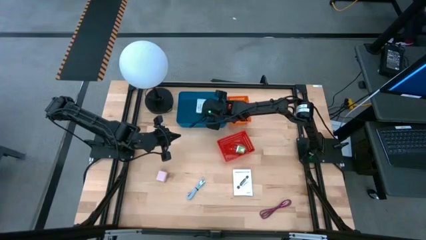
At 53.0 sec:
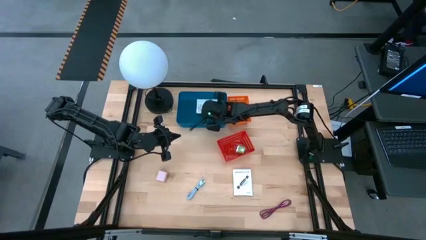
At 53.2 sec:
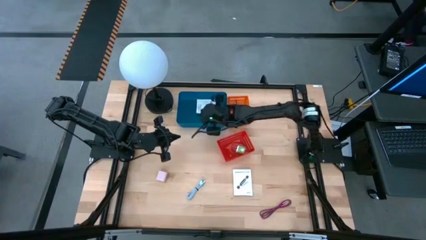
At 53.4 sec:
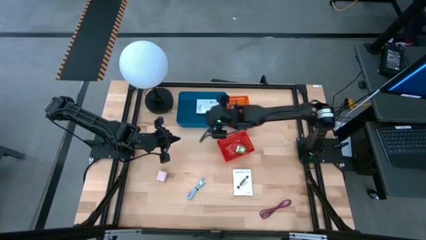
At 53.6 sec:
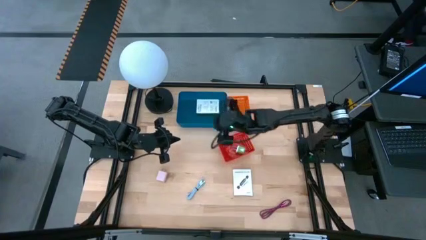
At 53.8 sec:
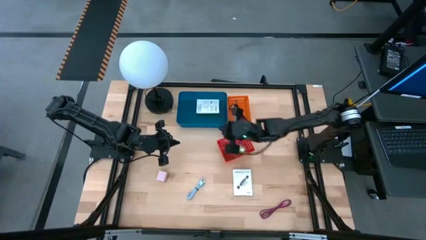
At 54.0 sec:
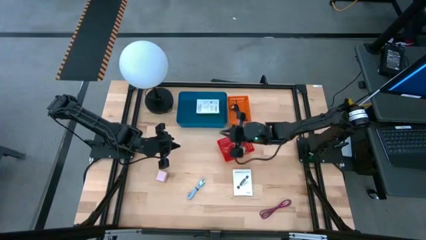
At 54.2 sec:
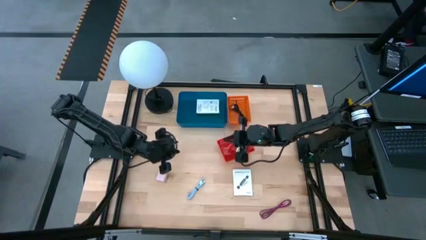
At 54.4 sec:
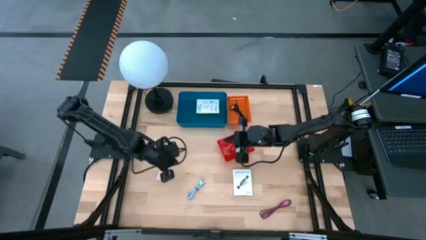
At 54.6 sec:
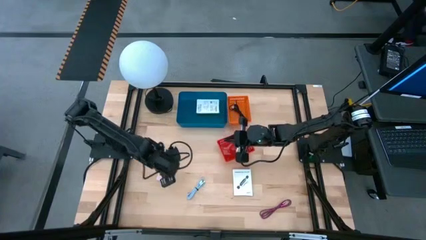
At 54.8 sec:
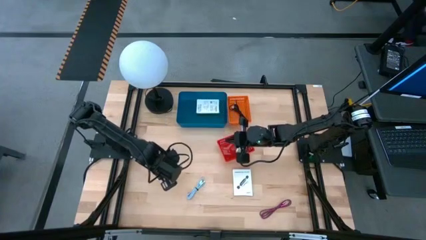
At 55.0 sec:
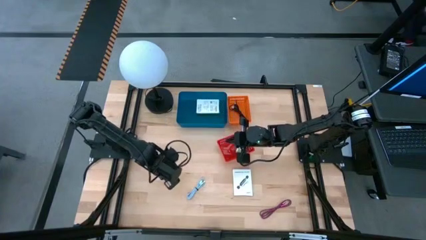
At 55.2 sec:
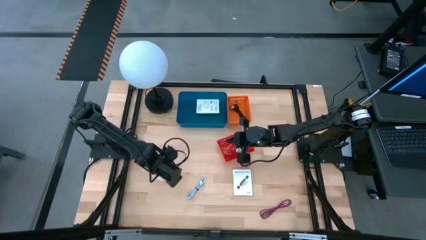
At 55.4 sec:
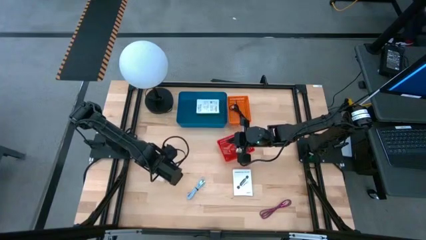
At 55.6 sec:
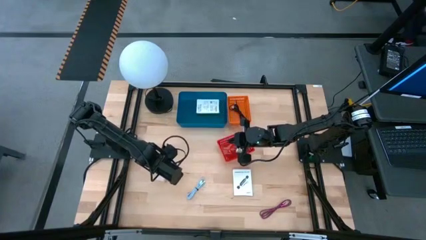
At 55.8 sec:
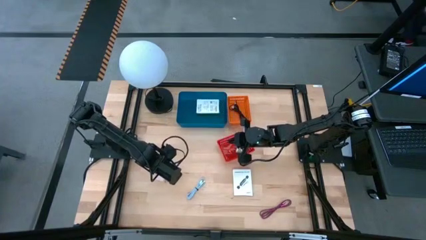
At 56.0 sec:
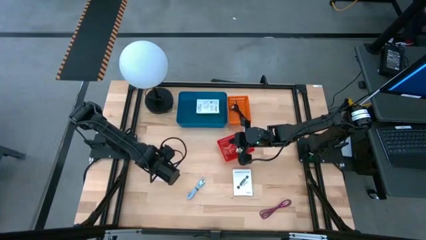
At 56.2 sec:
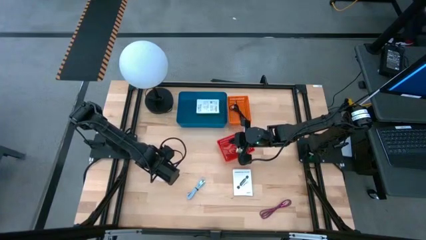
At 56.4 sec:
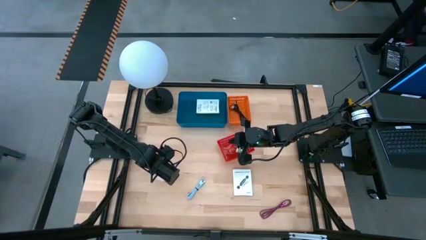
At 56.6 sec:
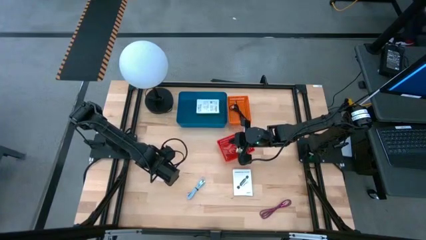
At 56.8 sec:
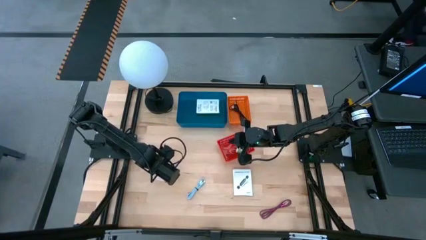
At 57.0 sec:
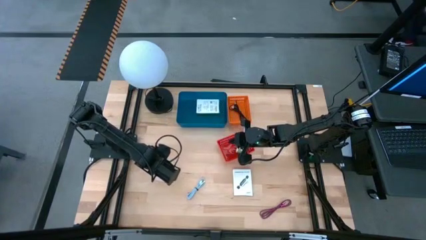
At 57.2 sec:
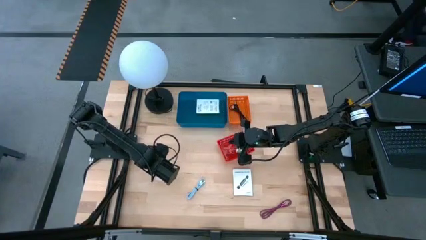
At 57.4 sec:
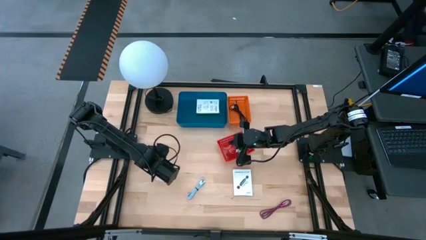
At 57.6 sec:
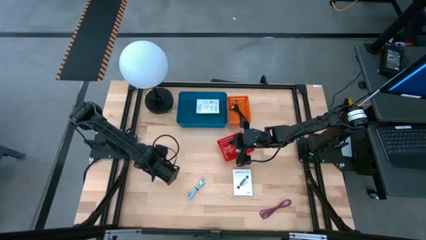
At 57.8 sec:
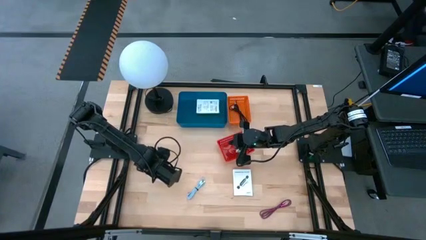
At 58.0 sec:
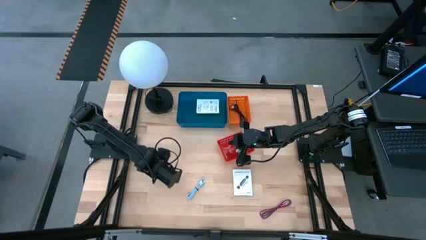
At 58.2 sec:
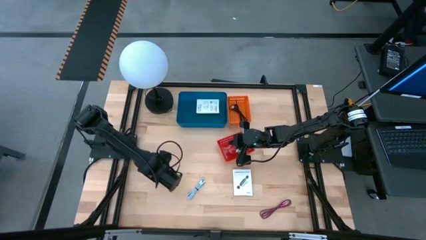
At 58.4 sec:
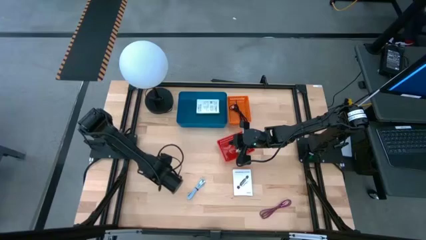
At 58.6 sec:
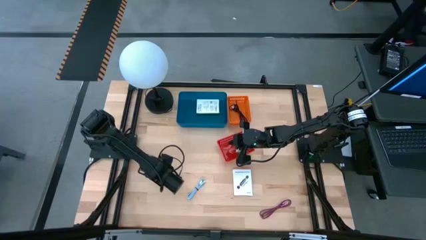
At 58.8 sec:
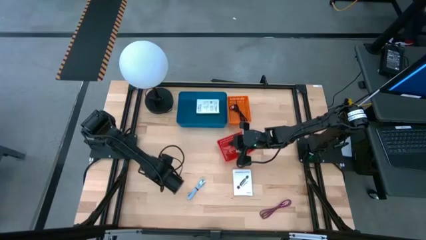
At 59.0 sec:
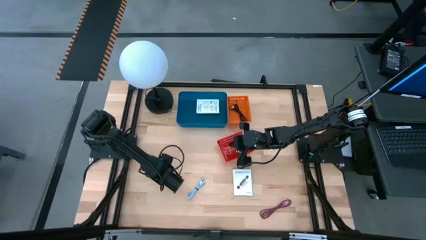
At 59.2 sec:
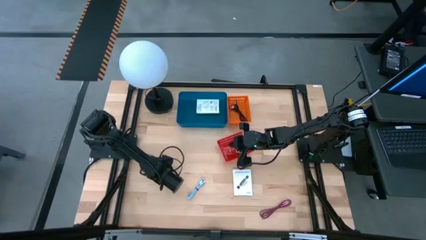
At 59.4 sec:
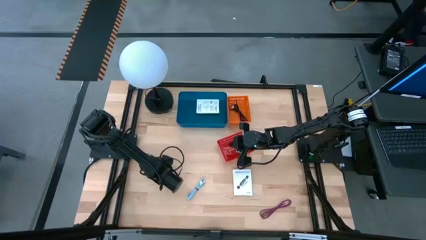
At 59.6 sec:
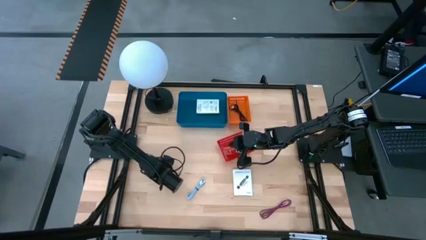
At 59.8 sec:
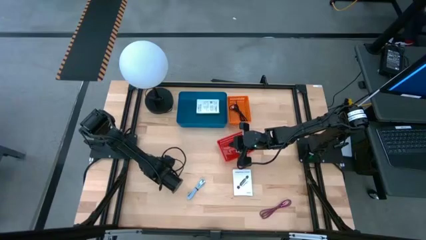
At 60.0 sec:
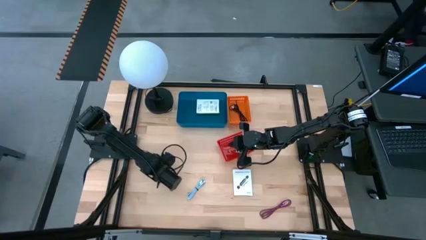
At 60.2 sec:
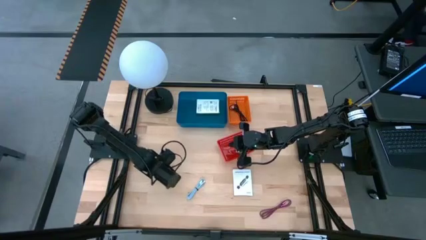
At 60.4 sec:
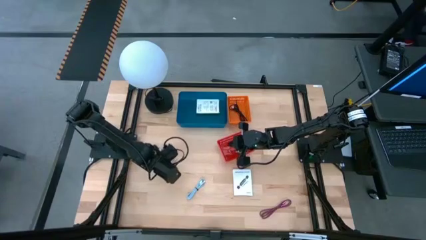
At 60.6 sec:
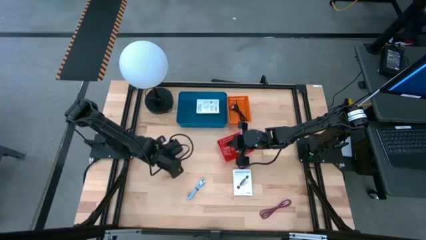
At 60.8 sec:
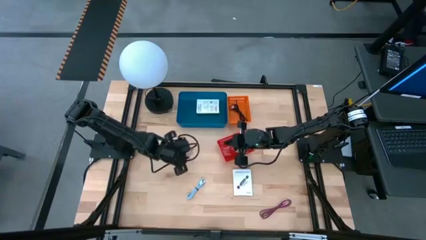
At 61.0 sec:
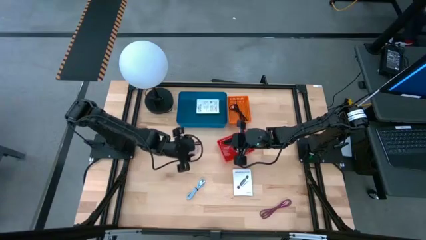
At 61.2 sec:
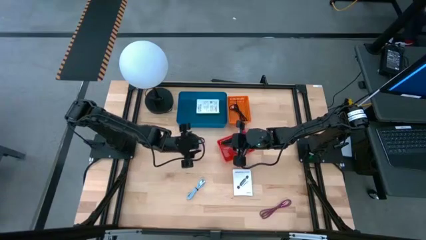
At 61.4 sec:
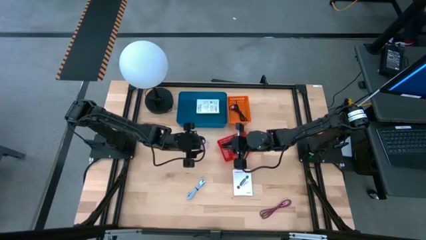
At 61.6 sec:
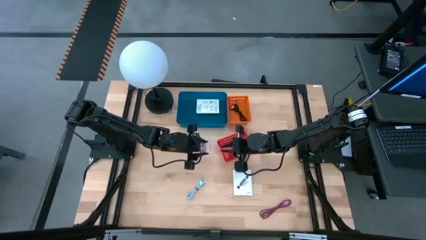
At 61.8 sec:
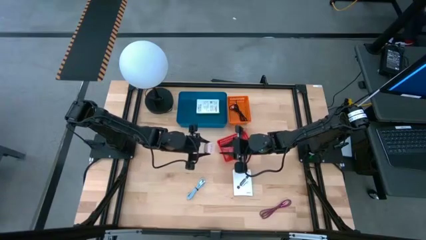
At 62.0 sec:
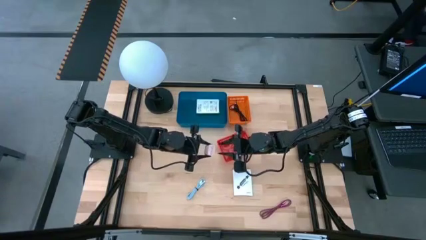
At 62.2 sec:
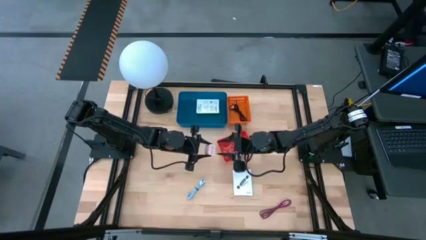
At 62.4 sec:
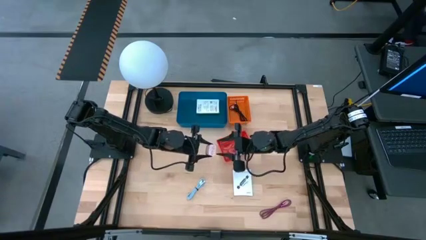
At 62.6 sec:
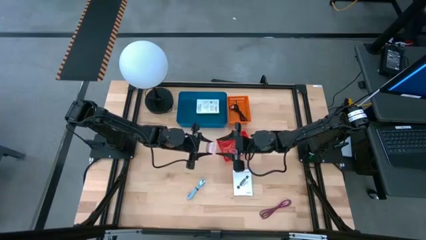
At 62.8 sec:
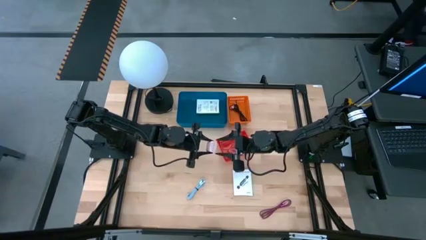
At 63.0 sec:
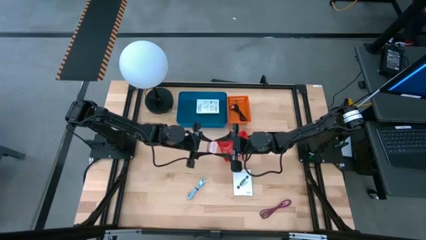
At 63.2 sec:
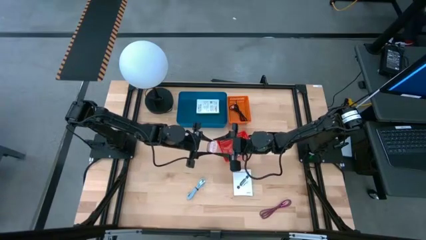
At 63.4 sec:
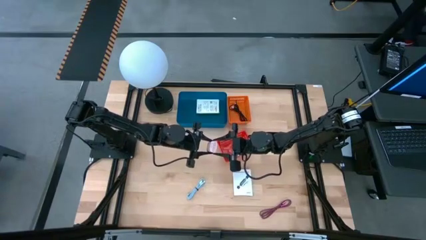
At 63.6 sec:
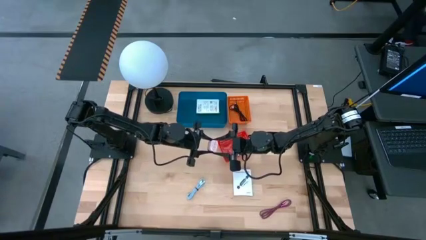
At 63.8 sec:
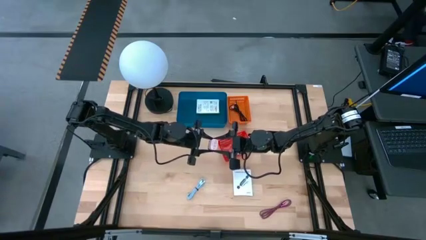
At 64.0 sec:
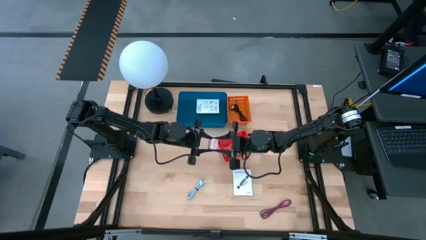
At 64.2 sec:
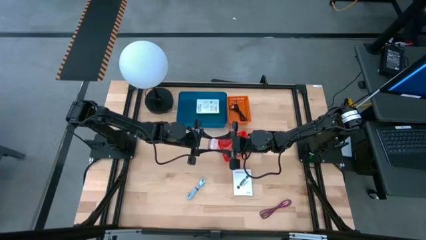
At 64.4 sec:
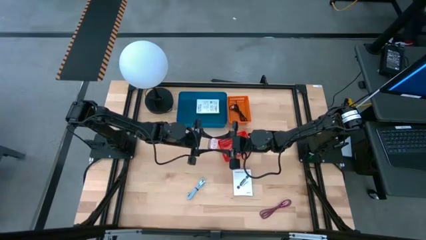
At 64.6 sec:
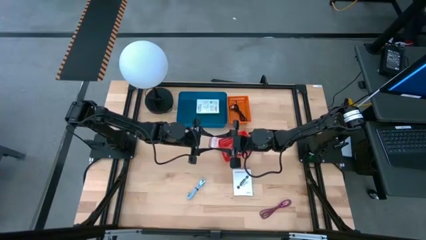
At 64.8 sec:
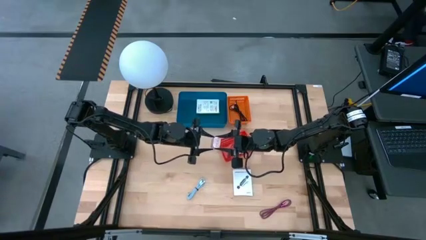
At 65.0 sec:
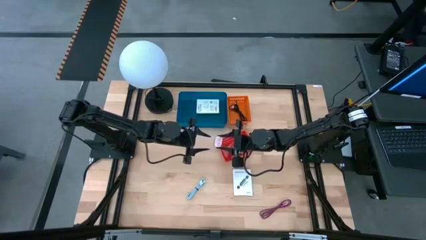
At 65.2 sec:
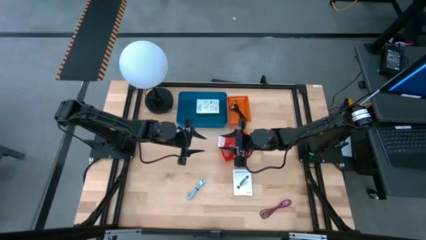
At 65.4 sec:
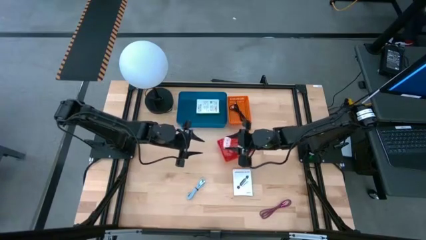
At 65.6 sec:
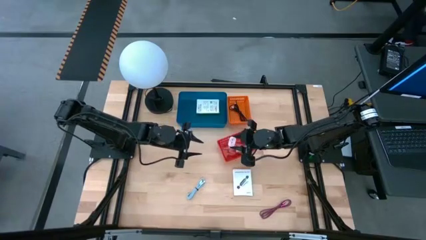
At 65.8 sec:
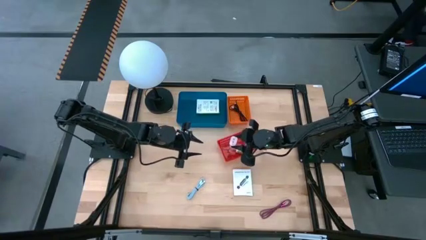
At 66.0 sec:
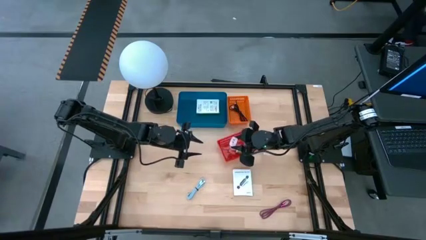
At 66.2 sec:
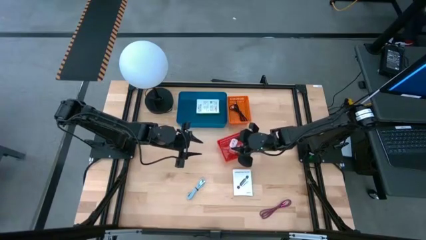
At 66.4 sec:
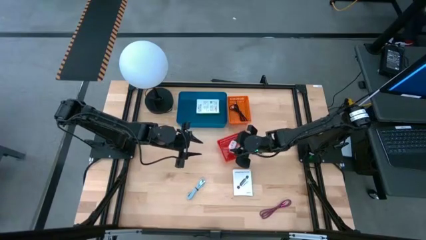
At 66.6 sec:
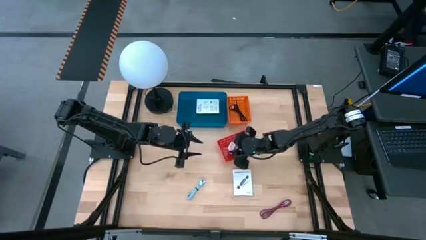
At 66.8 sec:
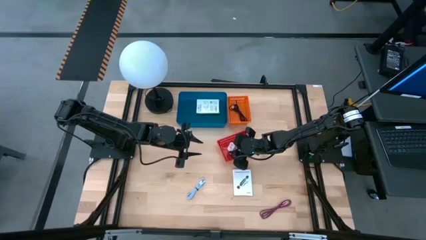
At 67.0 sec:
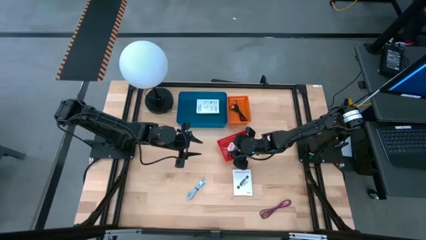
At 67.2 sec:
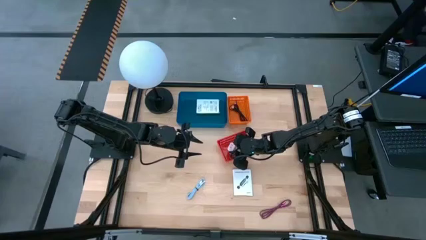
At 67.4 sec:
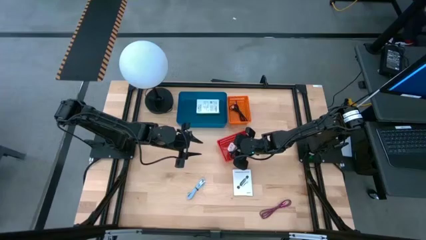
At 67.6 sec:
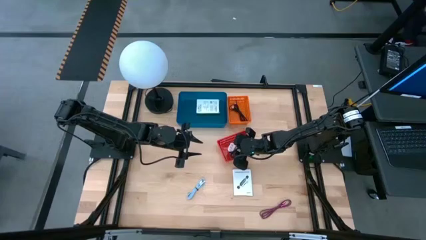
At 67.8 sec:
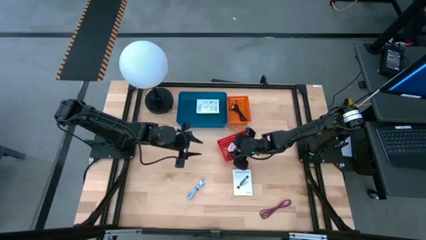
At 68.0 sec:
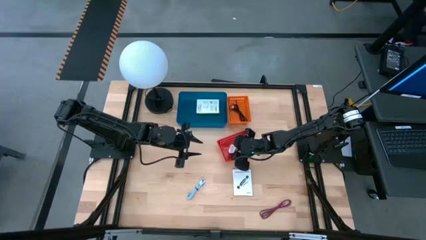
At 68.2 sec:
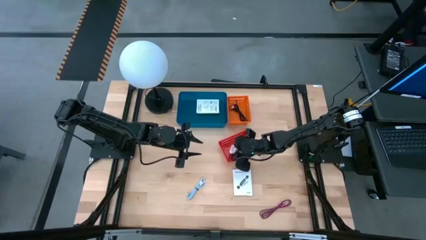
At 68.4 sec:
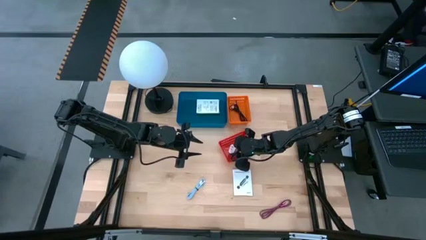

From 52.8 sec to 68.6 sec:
Task: Pick and place items into bin
Put the pink charger adapter into the red bin

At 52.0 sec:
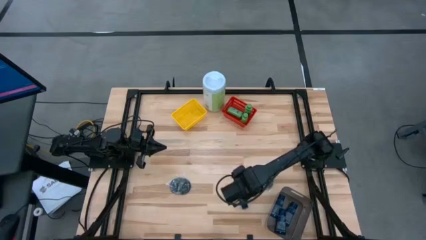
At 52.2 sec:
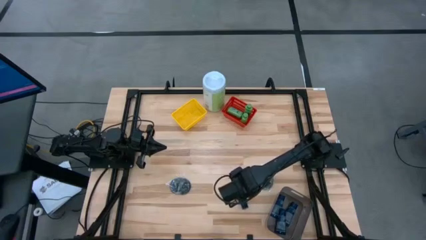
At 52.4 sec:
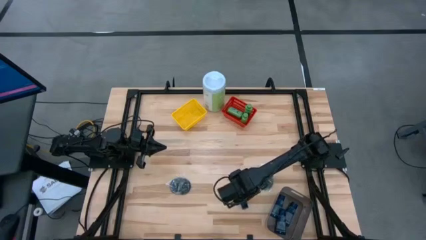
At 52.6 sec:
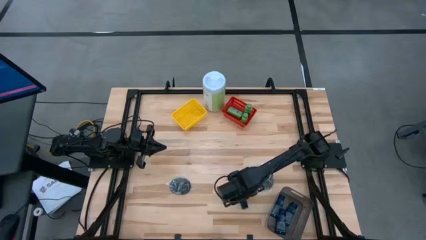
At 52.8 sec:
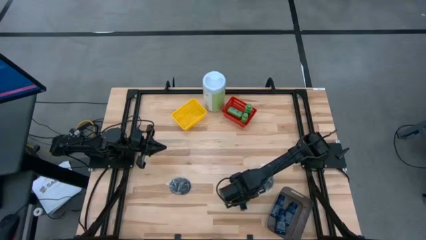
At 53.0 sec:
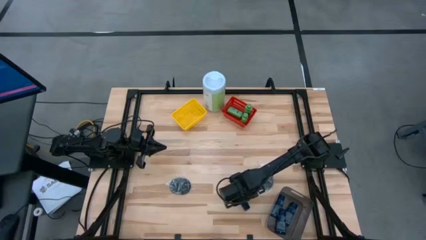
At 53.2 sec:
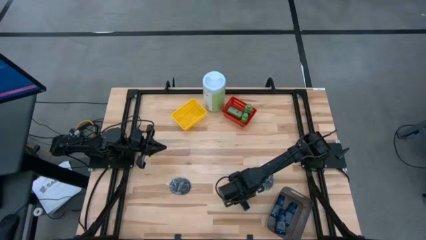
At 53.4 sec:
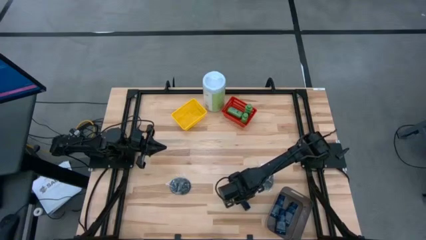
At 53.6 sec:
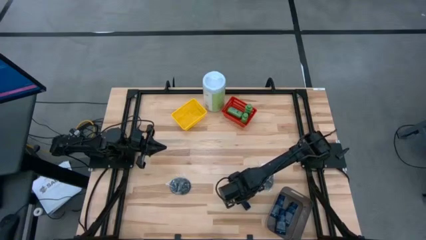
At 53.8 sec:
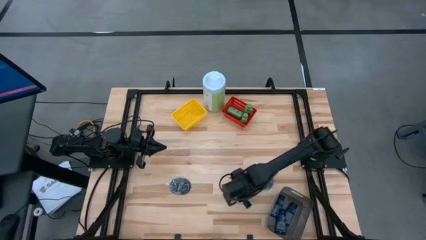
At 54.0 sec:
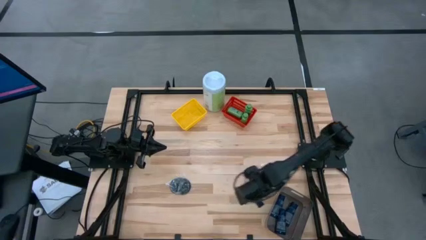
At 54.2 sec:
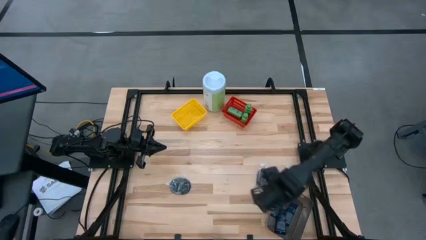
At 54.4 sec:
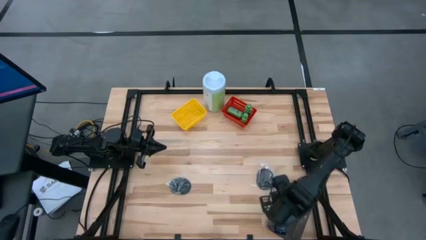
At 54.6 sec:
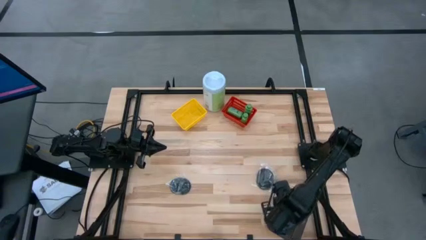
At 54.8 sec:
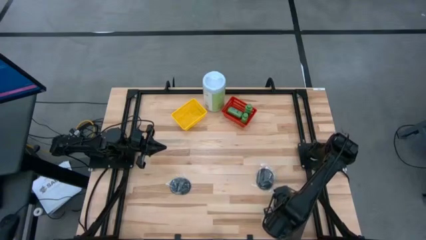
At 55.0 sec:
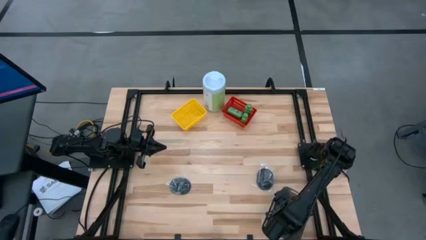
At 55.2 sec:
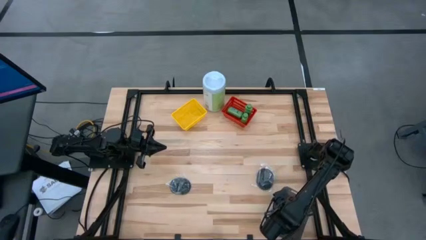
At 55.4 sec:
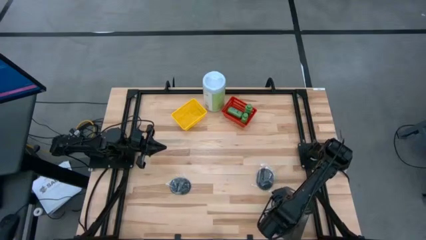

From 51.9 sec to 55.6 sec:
Task: Pick & Place Travel size toiletries
Put the dark blue shave cream in the black bin
